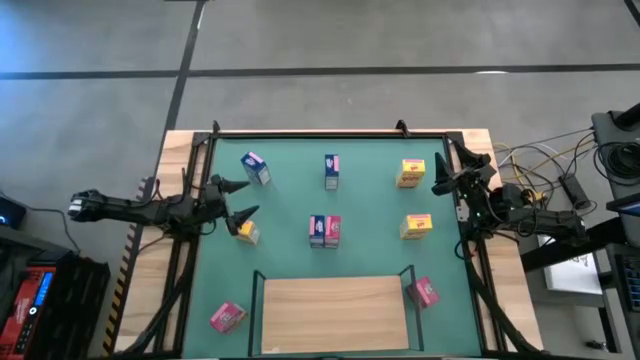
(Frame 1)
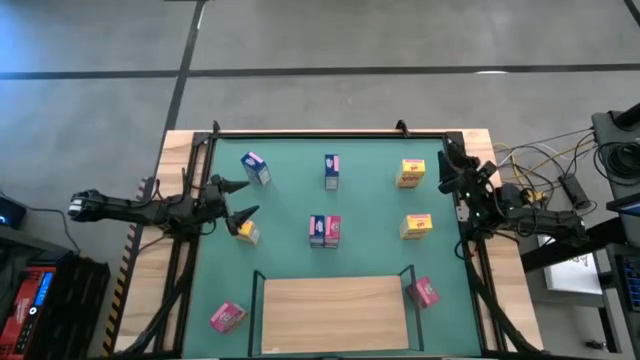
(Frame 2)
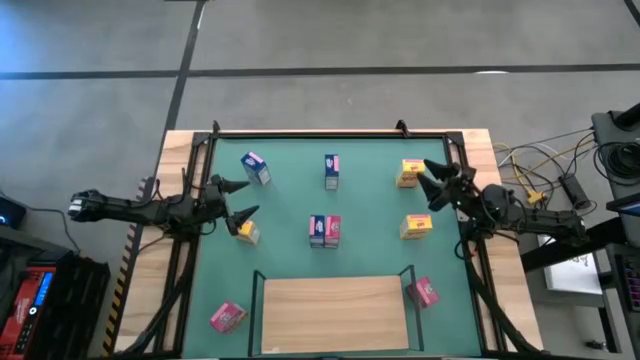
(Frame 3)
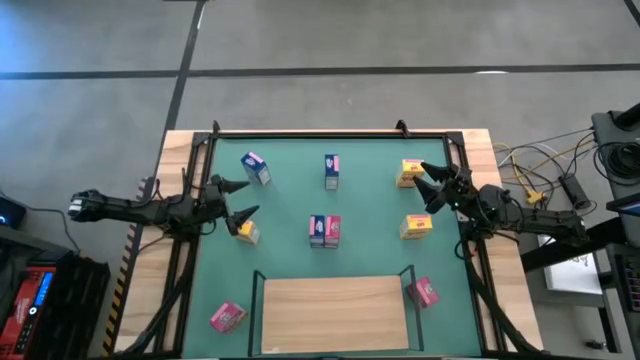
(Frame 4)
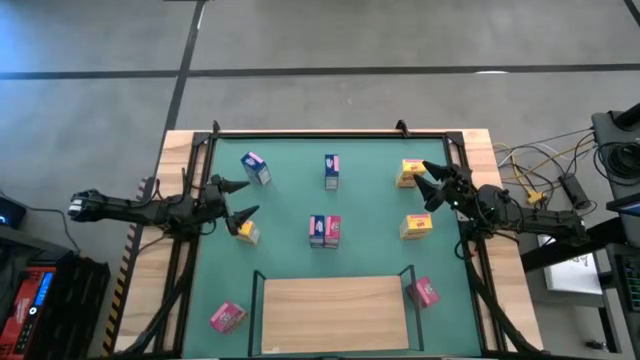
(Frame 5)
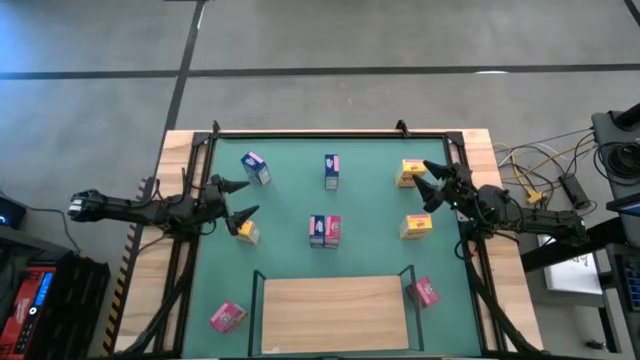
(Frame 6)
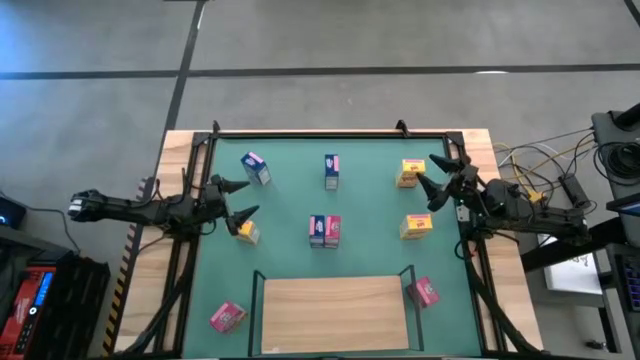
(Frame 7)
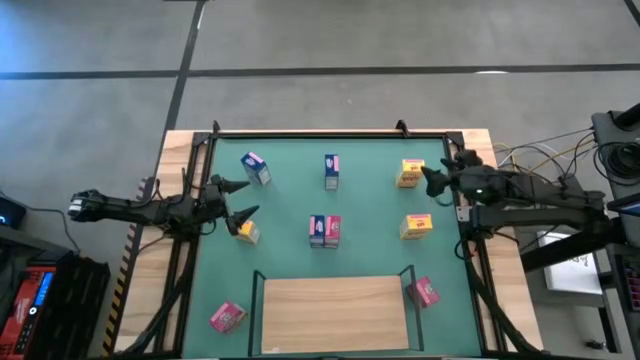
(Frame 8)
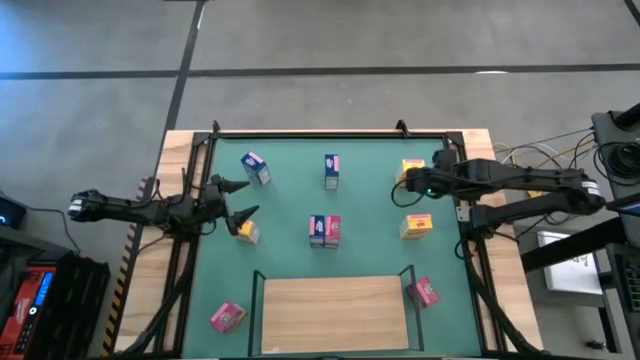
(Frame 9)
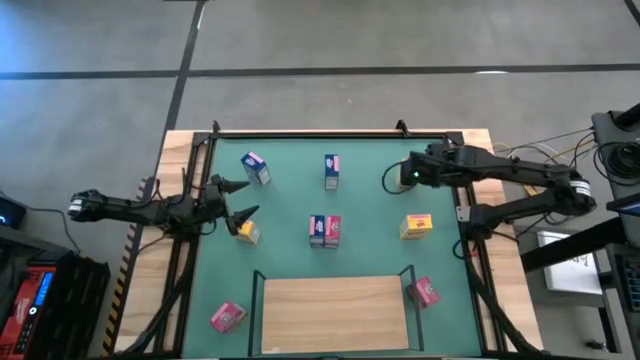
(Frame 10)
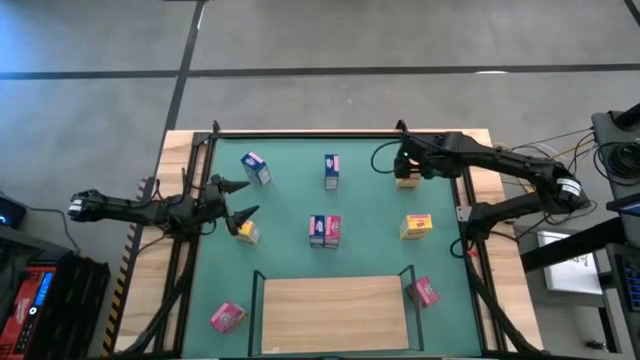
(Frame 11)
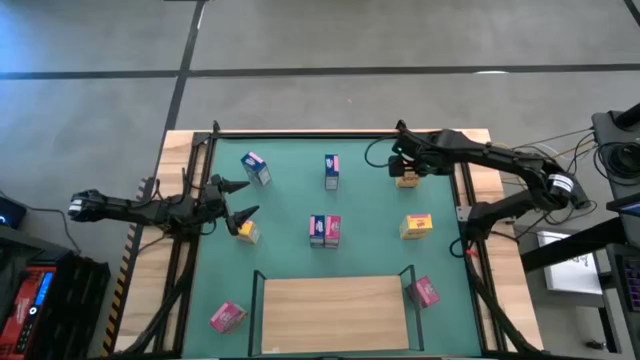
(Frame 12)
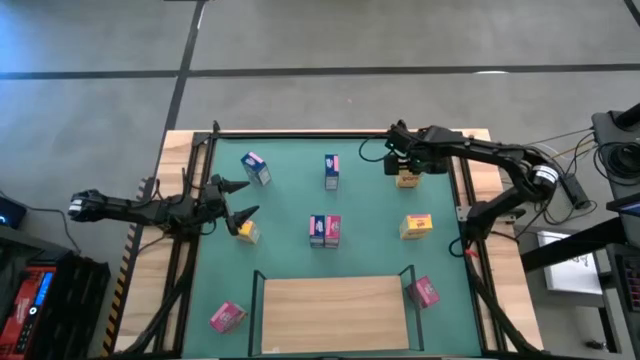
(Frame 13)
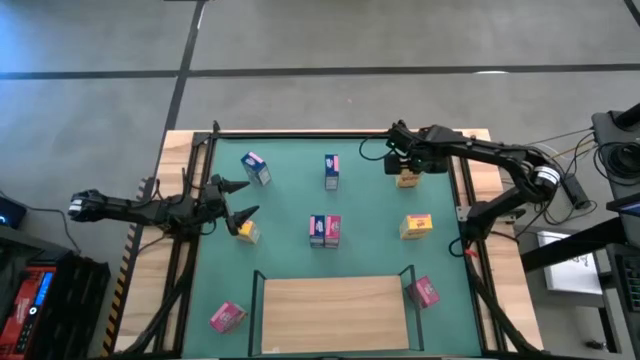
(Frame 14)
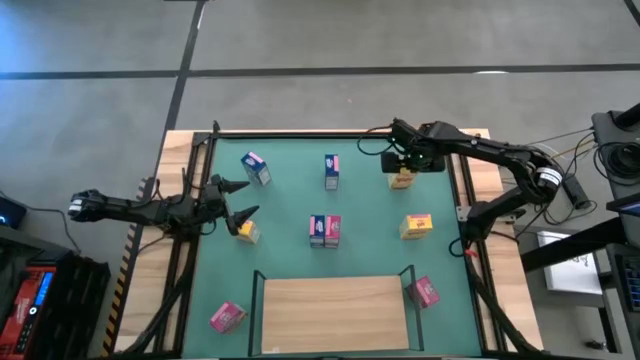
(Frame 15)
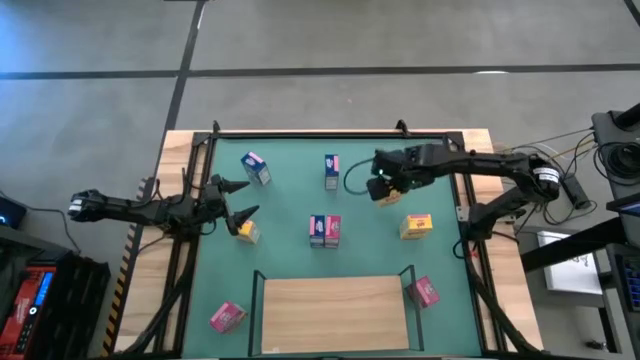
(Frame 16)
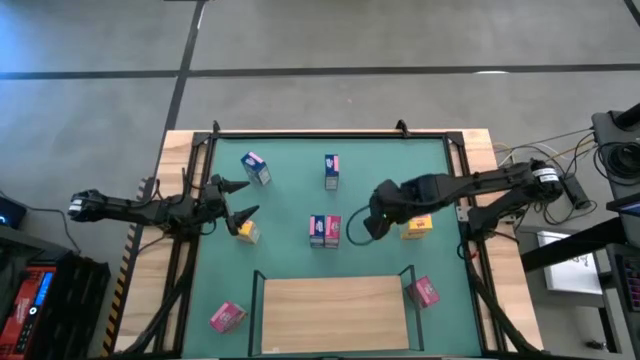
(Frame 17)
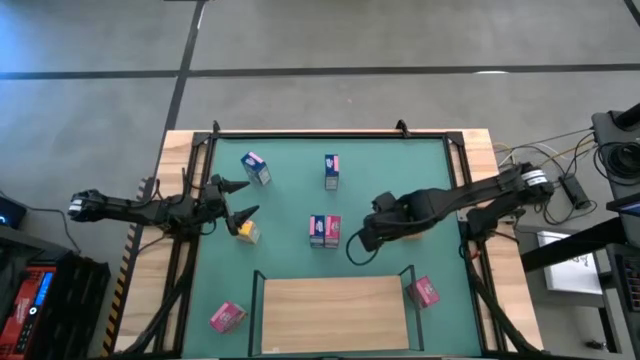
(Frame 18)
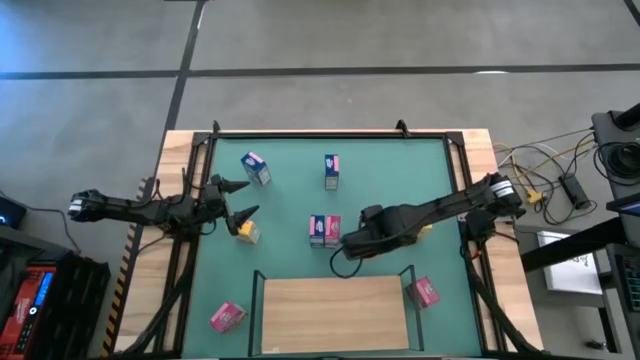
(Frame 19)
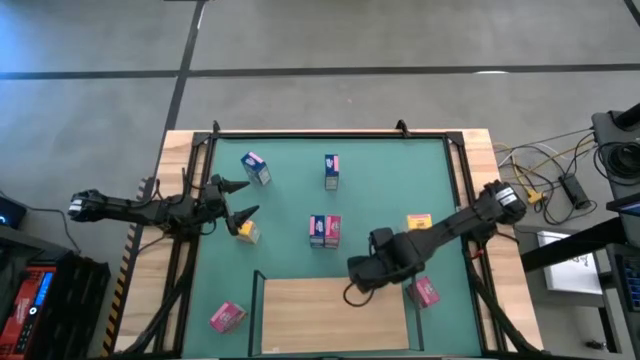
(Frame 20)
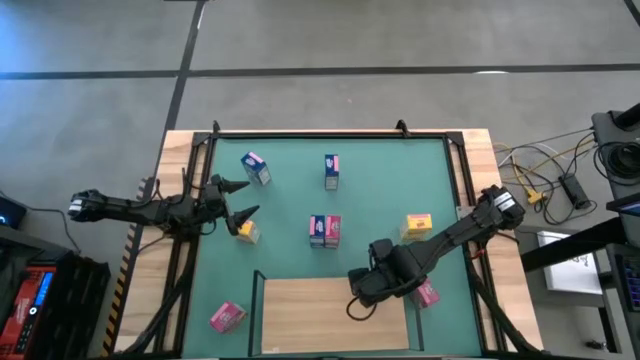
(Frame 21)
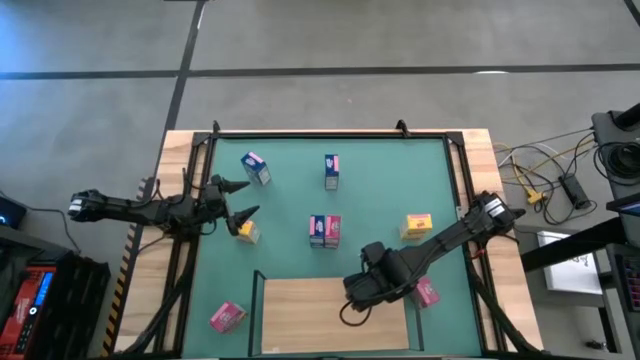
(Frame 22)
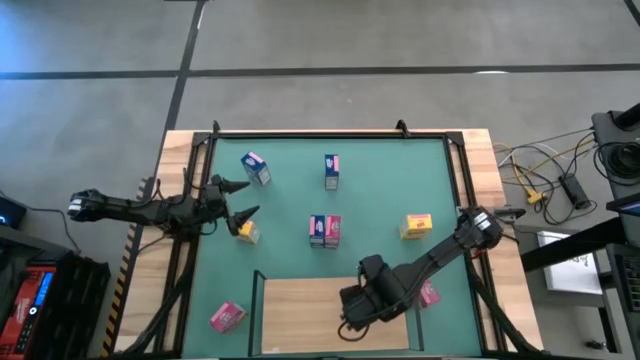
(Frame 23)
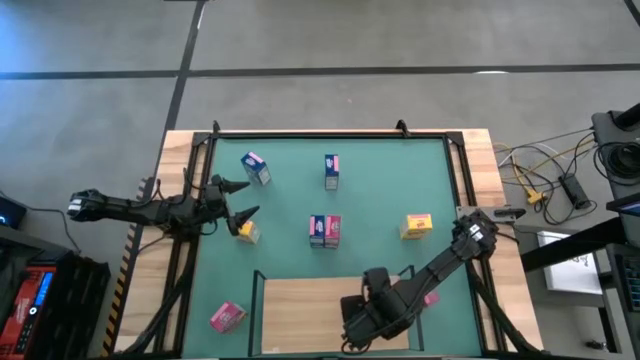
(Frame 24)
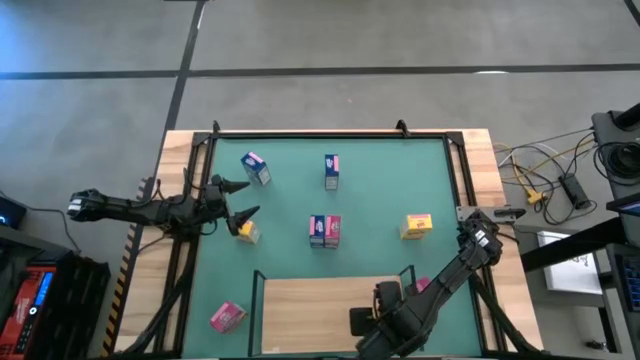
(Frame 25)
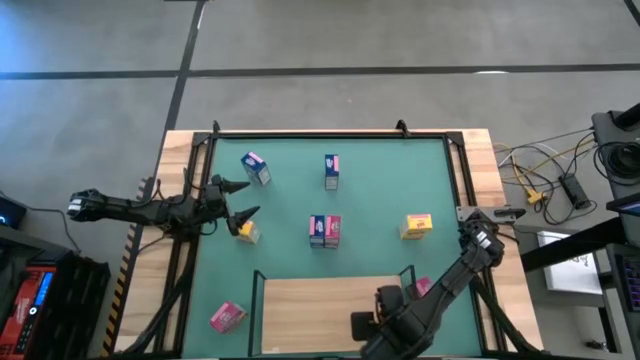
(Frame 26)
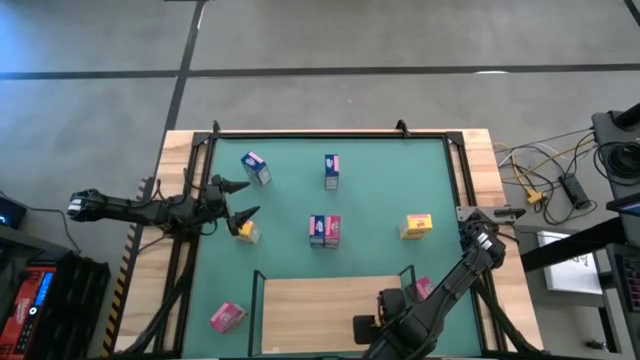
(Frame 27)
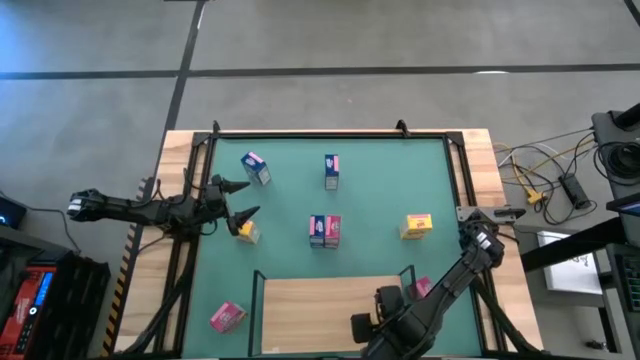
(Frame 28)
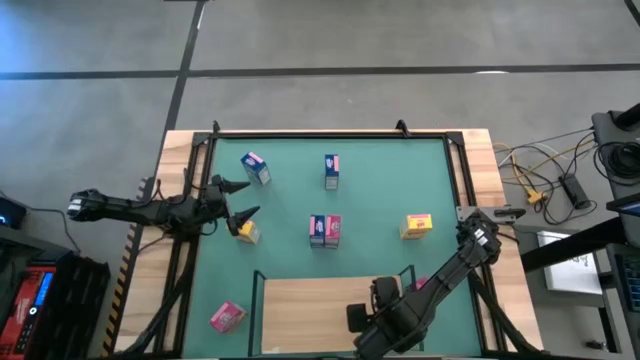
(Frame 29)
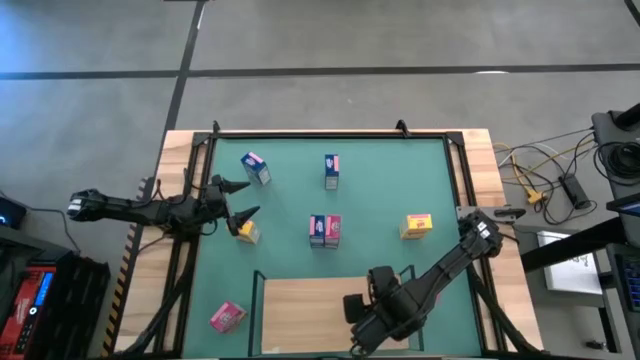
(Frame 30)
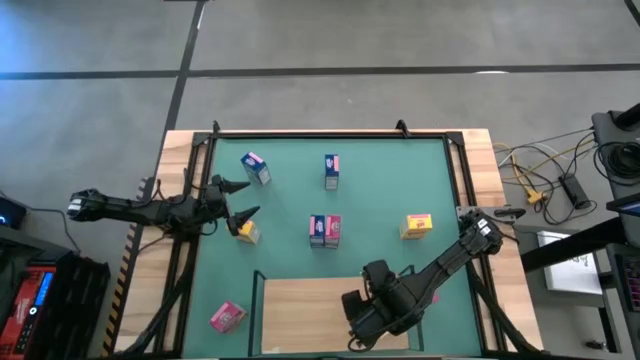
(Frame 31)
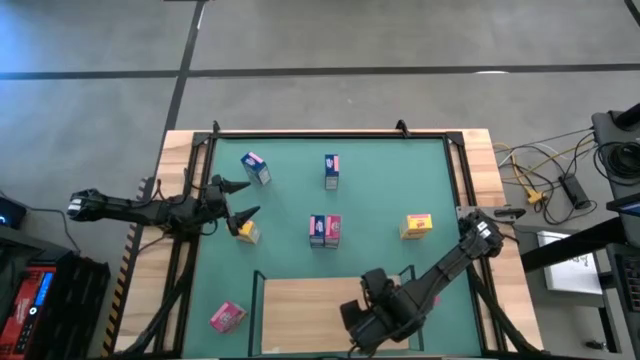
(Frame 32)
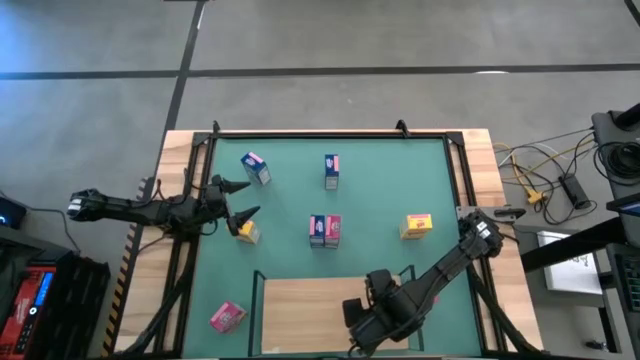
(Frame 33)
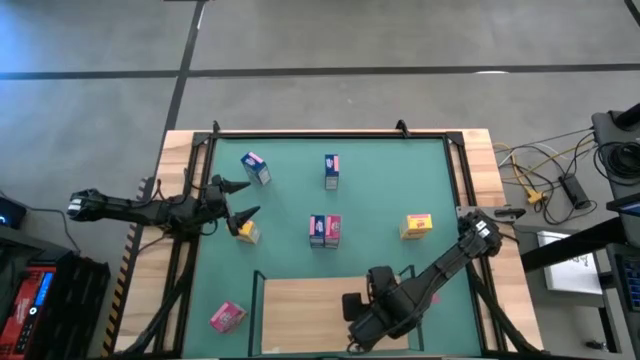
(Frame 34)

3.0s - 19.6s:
Task: Stack cereal on shelf
Put the top yellow cereal box on the shelf

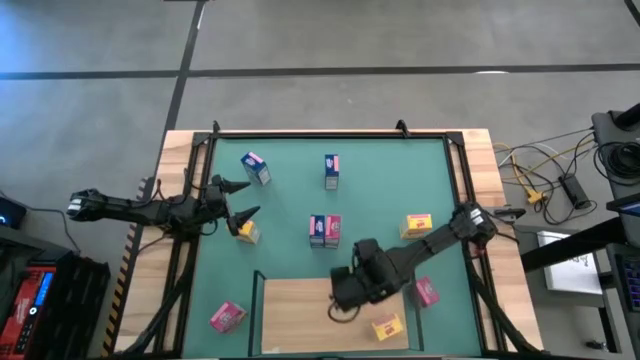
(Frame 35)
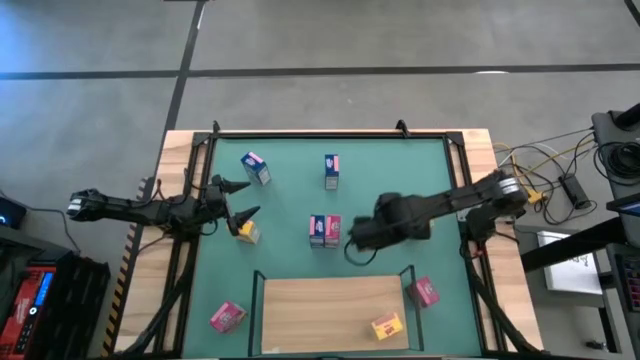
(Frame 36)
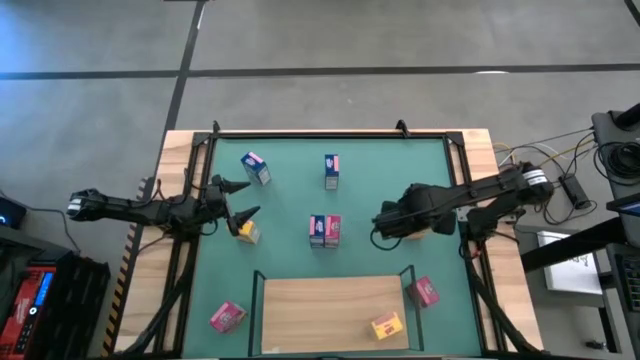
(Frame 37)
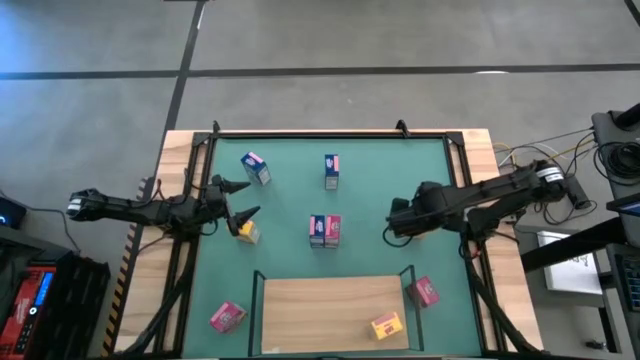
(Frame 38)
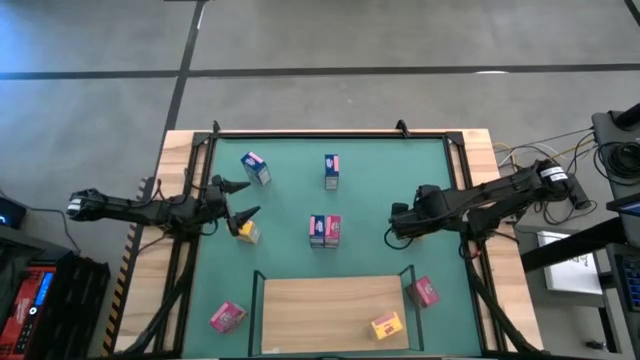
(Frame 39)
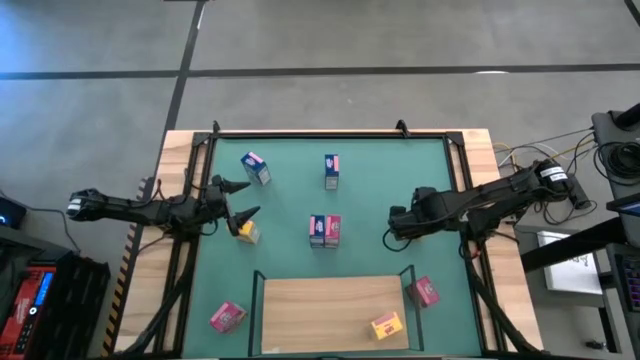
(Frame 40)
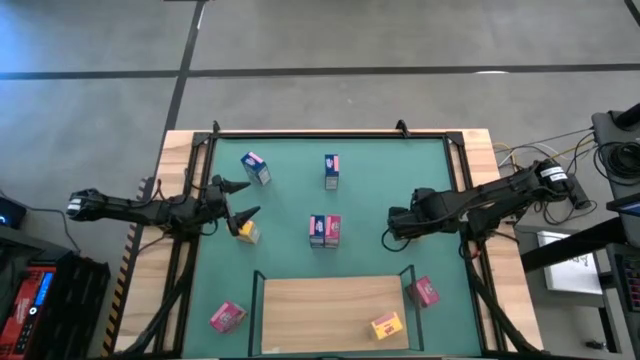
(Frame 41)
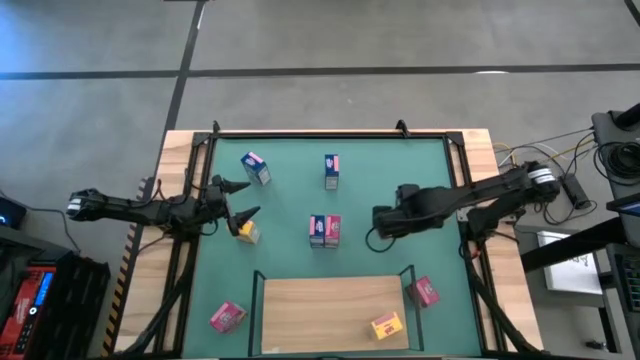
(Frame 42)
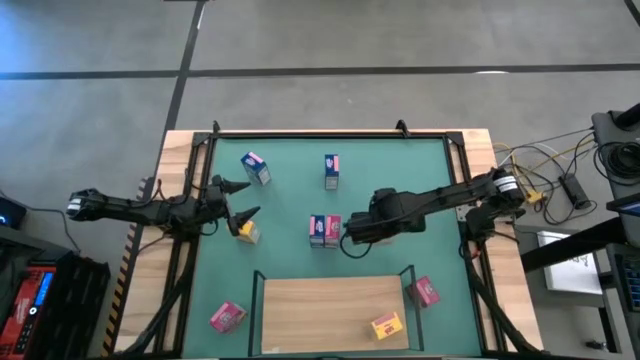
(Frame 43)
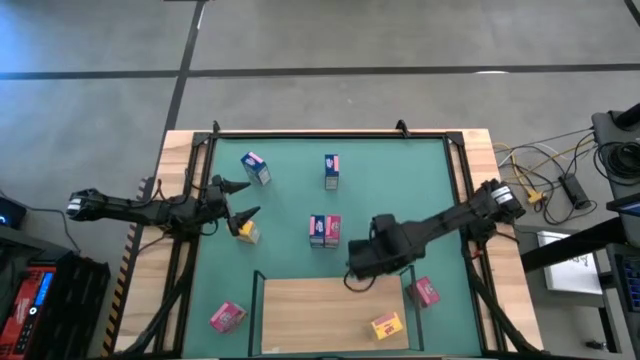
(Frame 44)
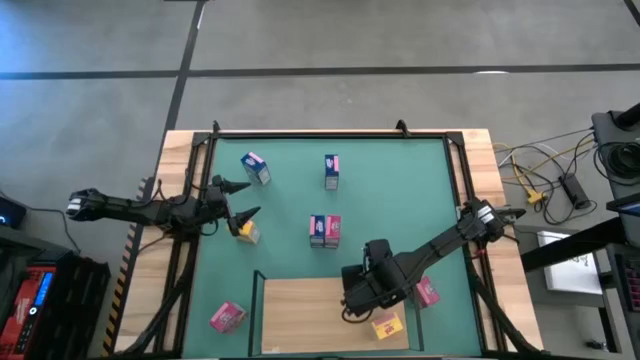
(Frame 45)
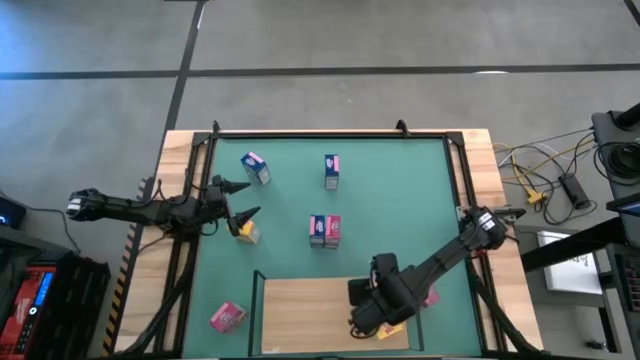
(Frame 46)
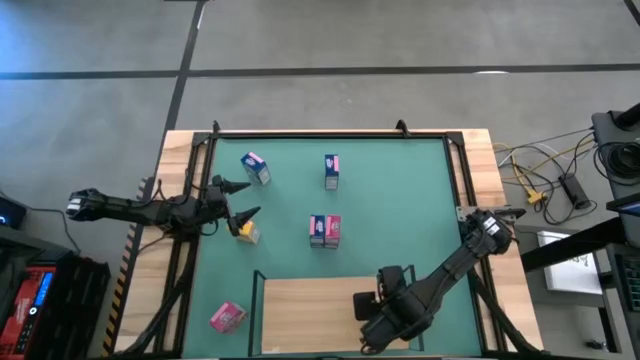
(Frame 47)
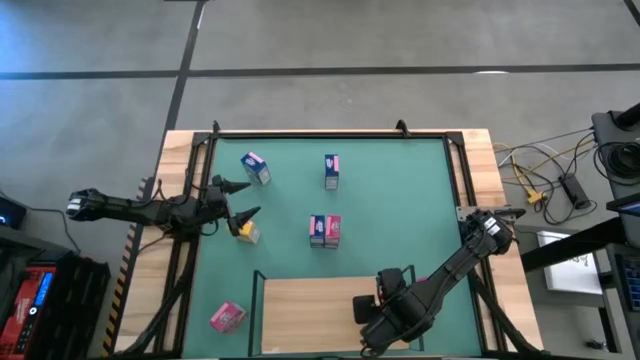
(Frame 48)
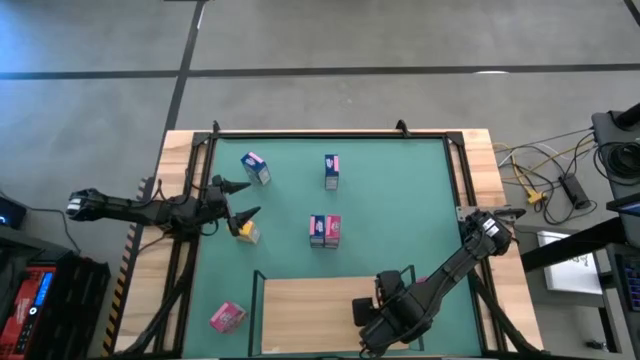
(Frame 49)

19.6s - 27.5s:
Put the right yellow cereal box on the shelf aligned with the other yellow cereal box
